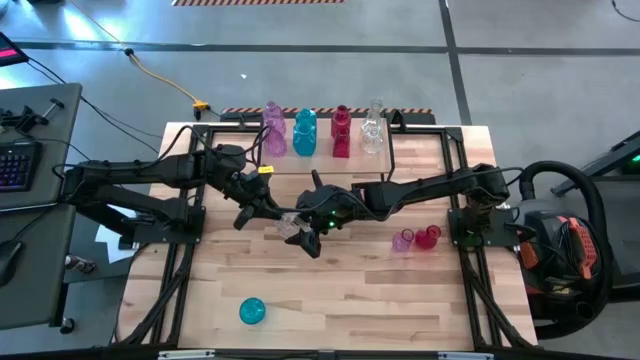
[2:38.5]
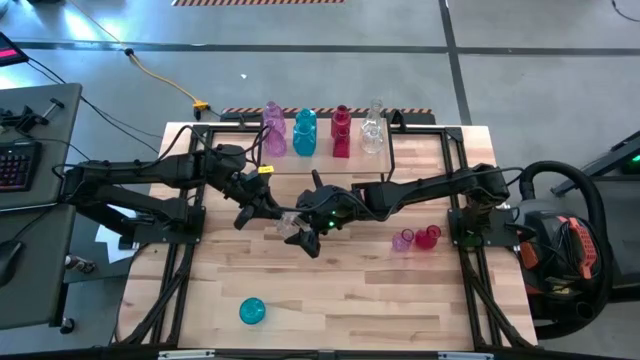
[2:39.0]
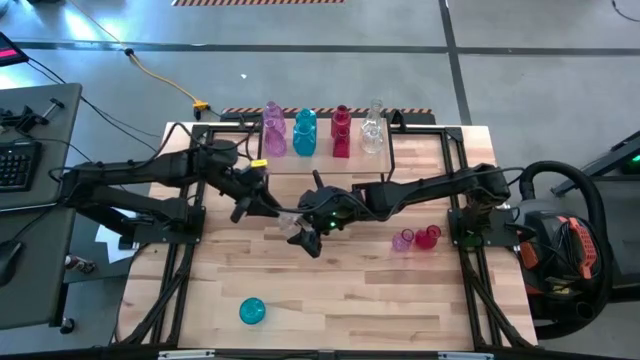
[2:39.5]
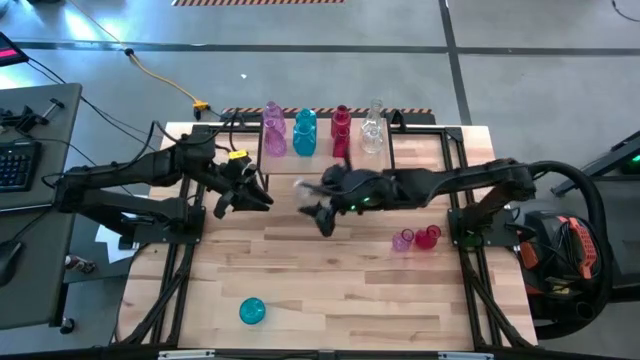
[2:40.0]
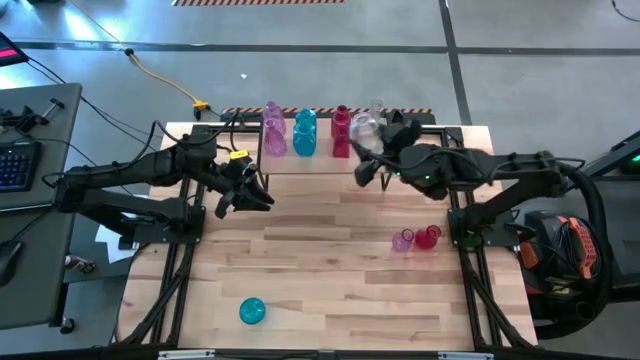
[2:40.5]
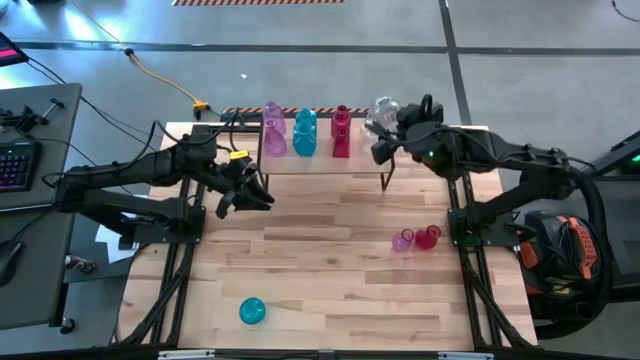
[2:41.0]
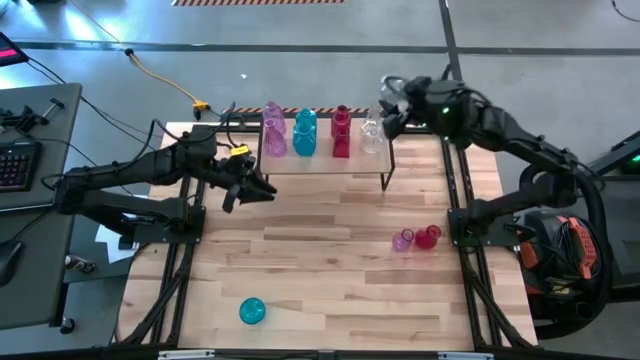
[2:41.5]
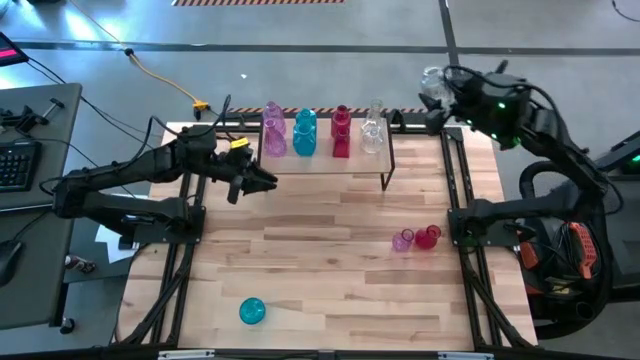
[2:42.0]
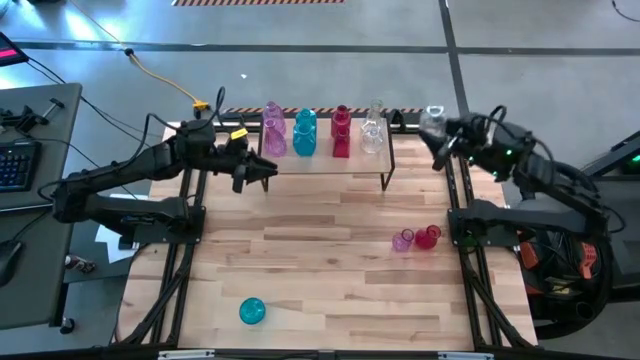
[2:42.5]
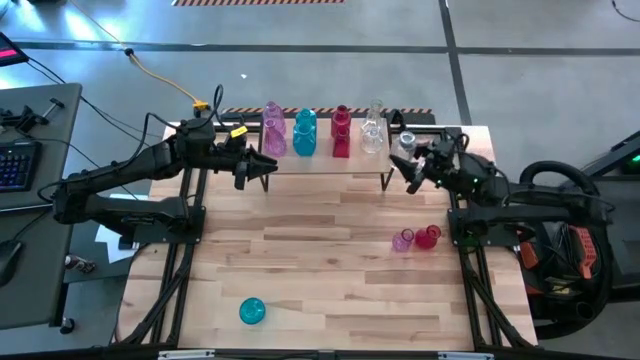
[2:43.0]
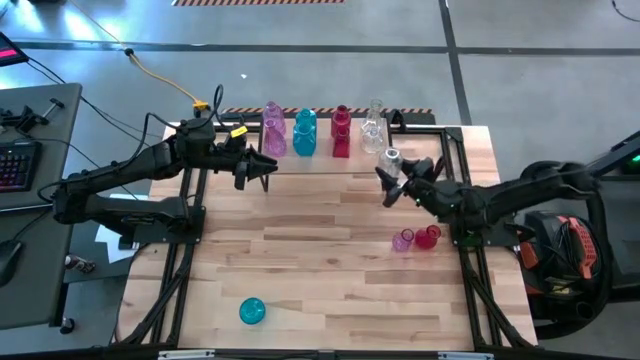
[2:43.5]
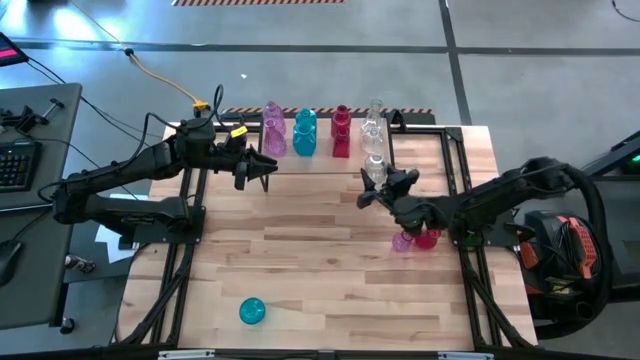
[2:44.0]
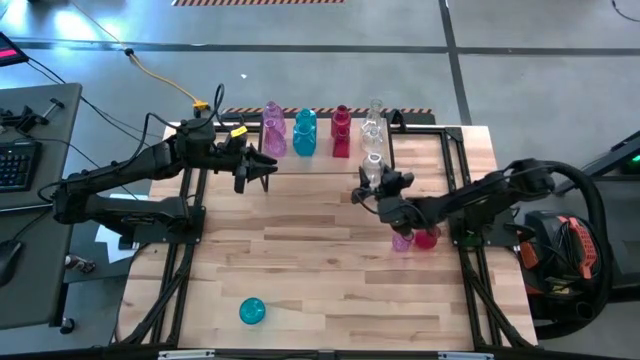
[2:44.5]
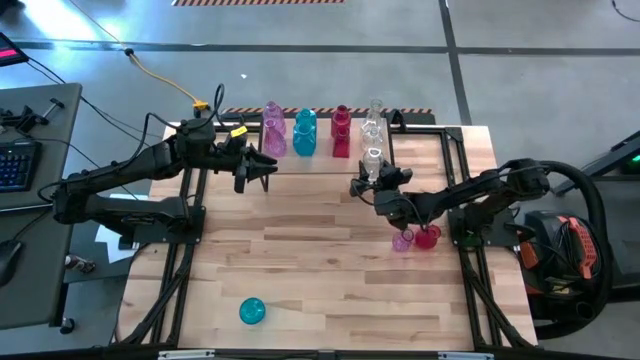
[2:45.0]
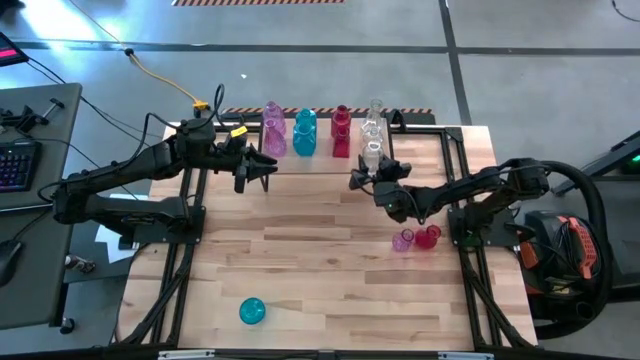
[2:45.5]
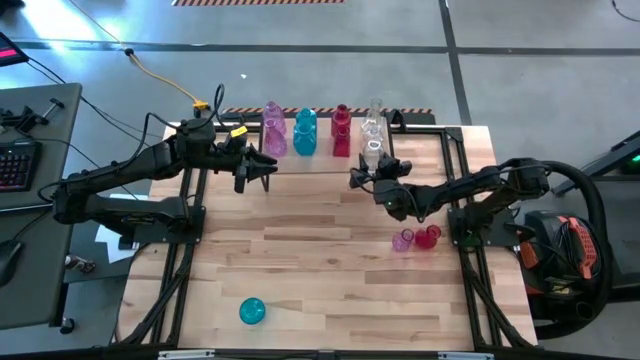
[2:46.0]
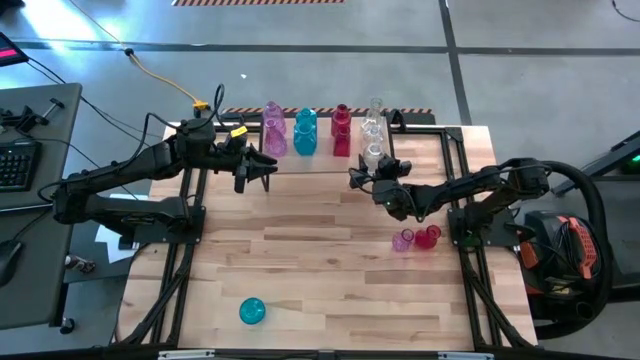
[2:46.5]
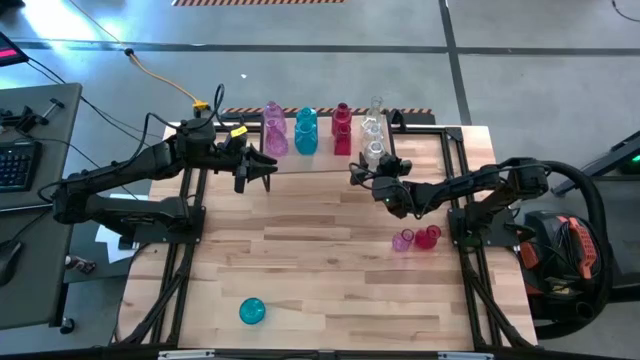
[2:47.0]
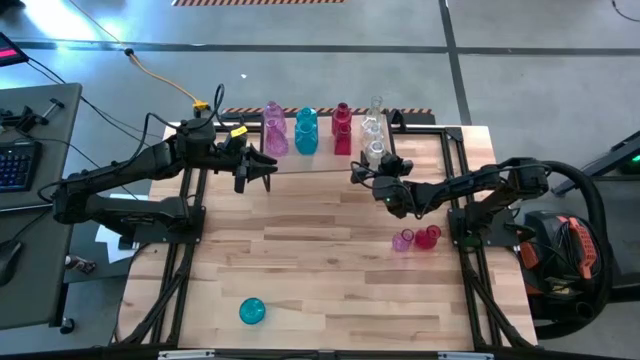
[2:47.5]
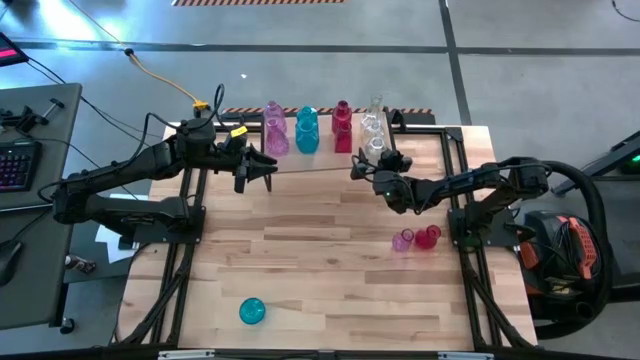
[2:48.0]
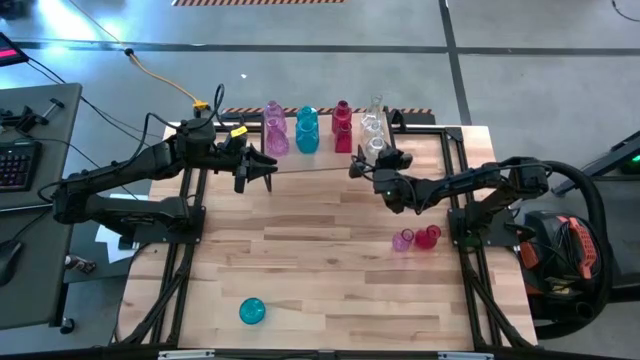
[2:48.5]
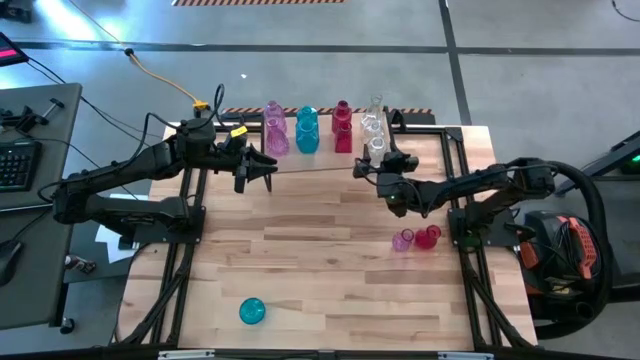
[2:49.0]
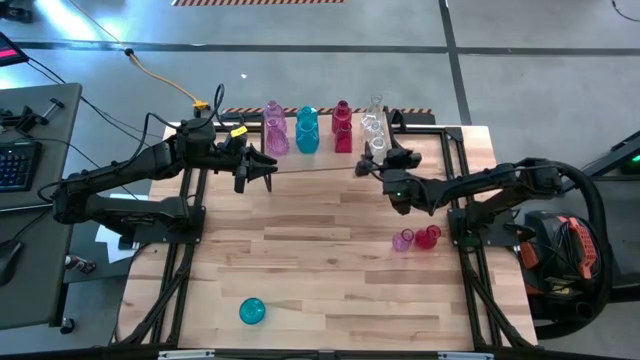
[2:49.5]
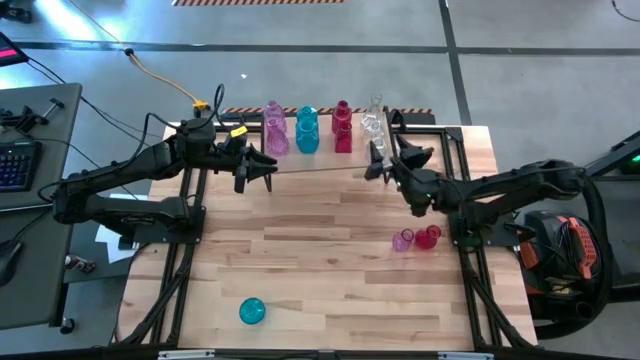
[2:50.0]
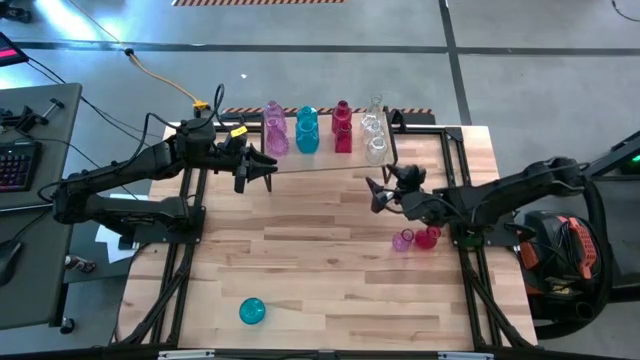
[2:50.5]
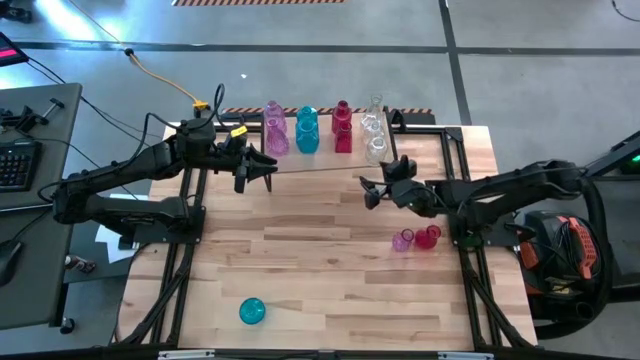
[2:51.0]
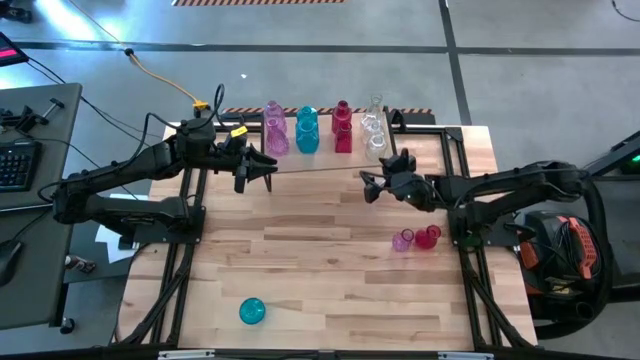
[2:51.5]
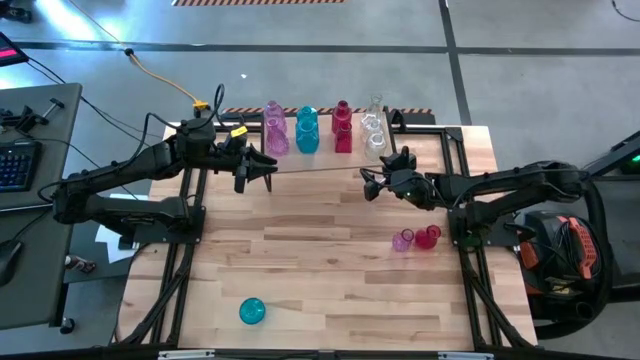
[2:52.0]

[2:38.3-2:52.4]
Task: sort vases onto shelf
Put the transparent vase on the shelf aligned with the other transparent vases

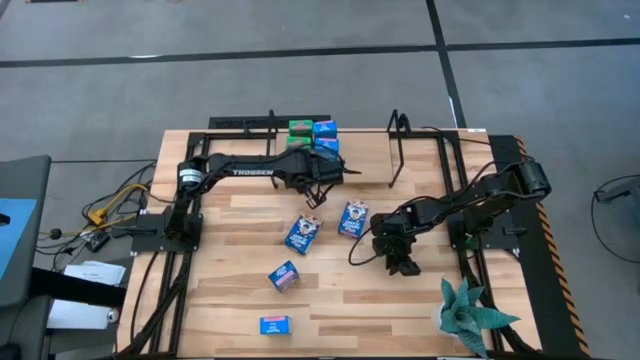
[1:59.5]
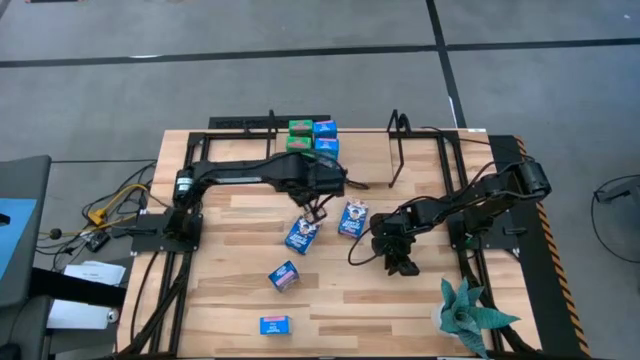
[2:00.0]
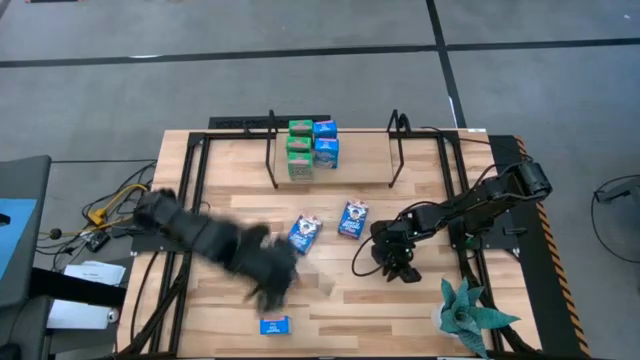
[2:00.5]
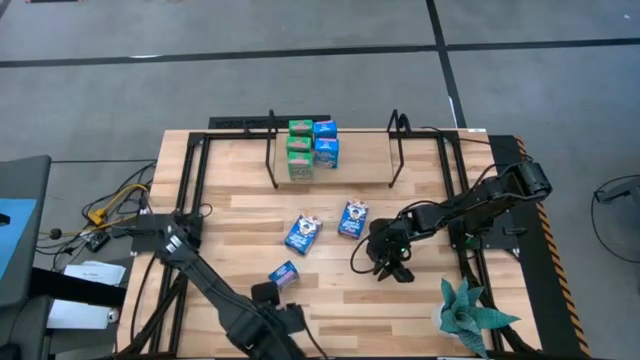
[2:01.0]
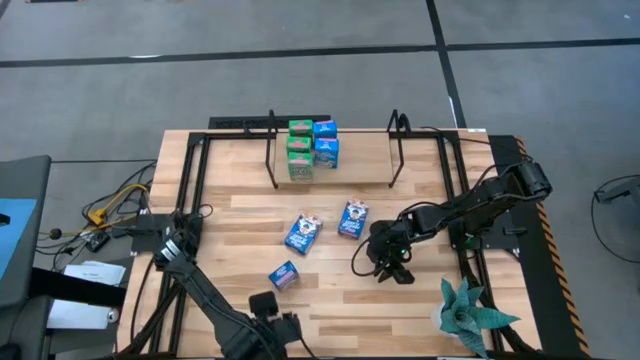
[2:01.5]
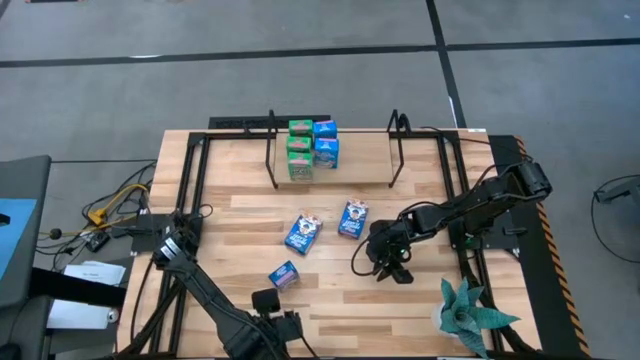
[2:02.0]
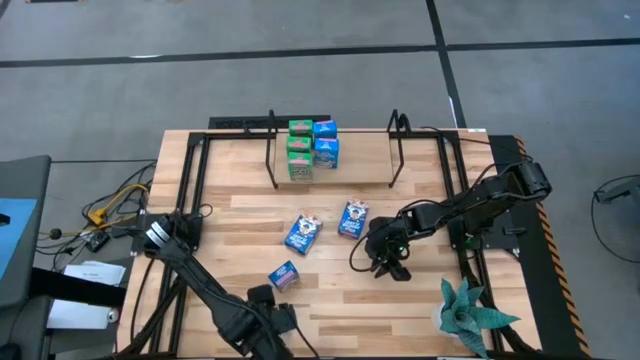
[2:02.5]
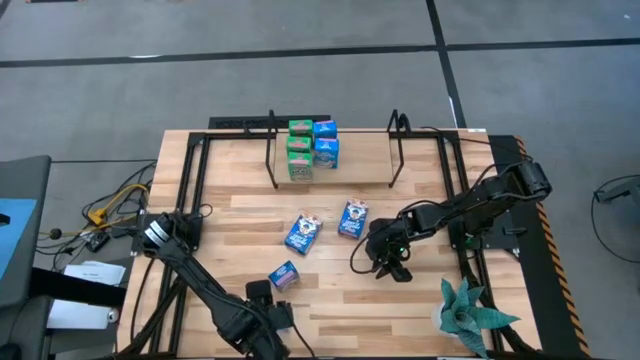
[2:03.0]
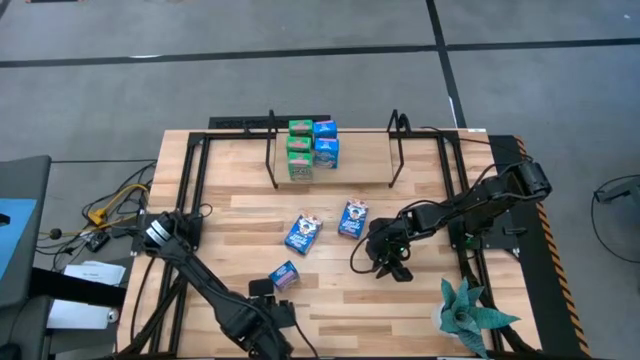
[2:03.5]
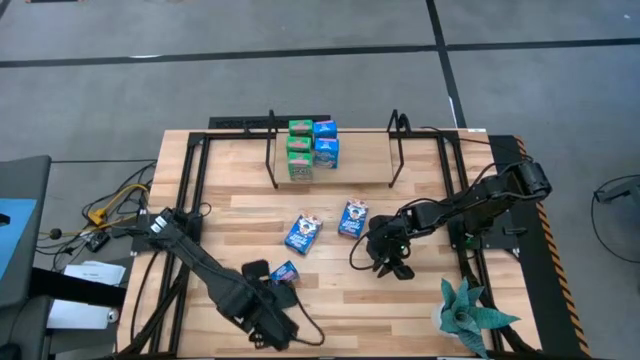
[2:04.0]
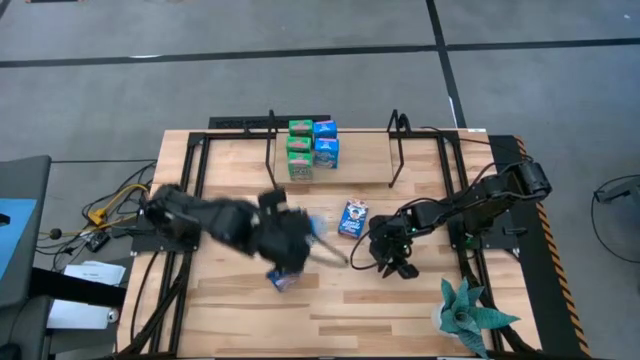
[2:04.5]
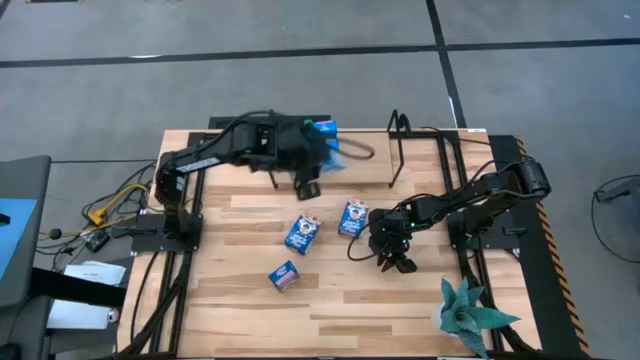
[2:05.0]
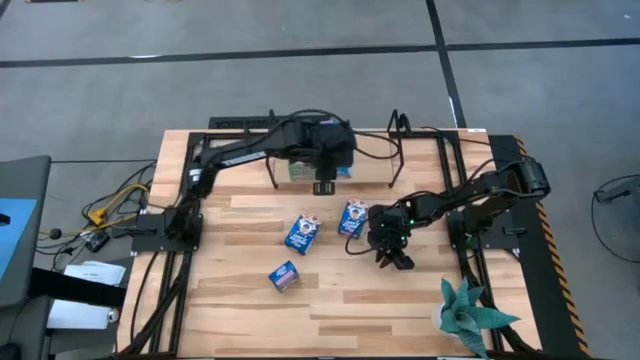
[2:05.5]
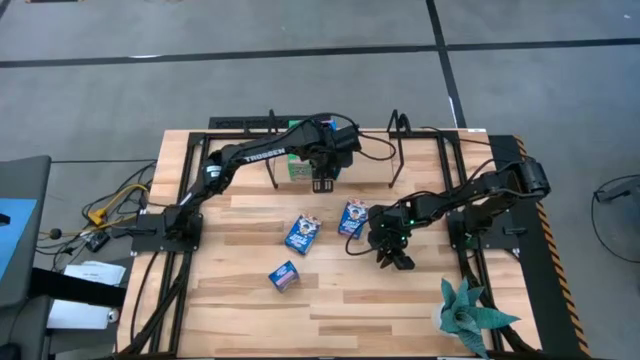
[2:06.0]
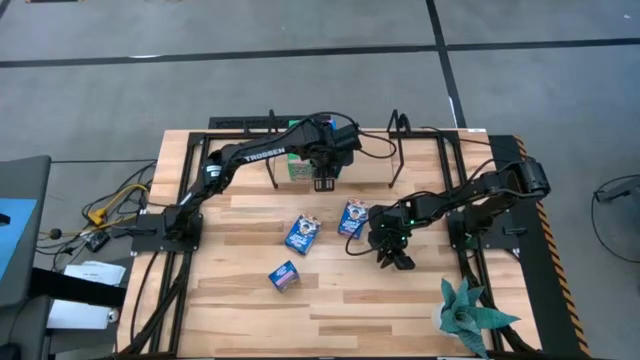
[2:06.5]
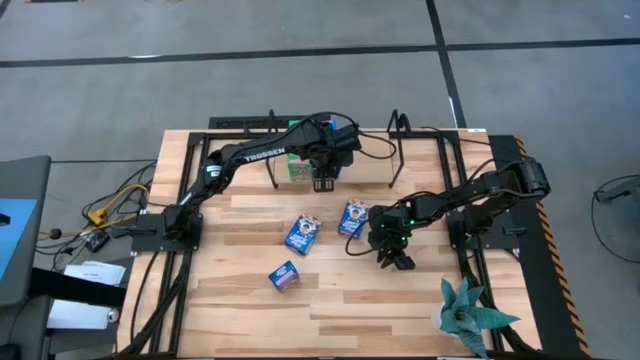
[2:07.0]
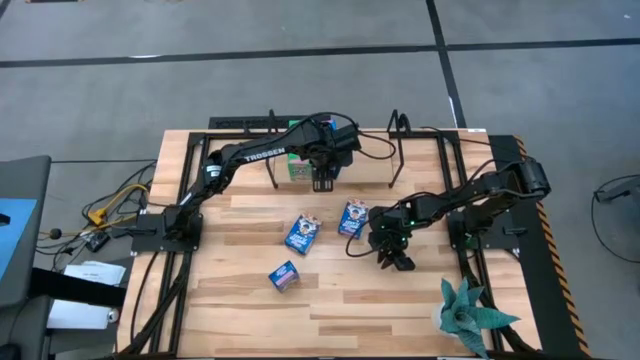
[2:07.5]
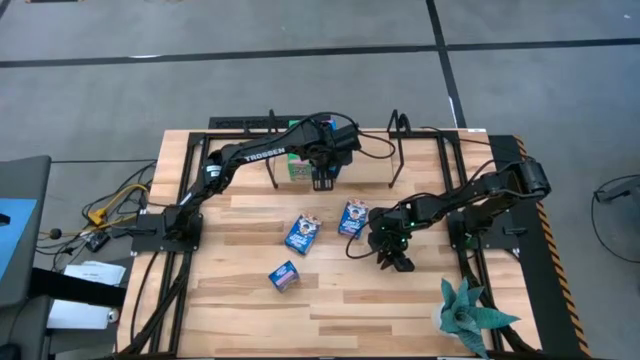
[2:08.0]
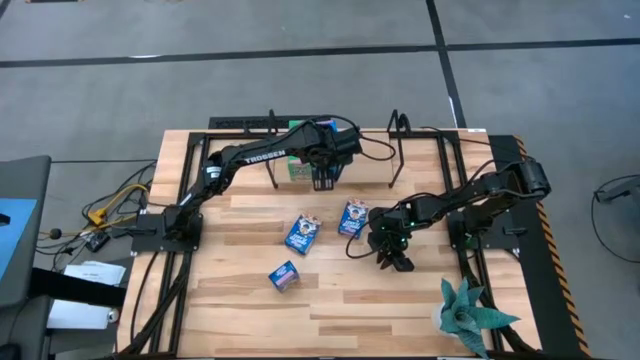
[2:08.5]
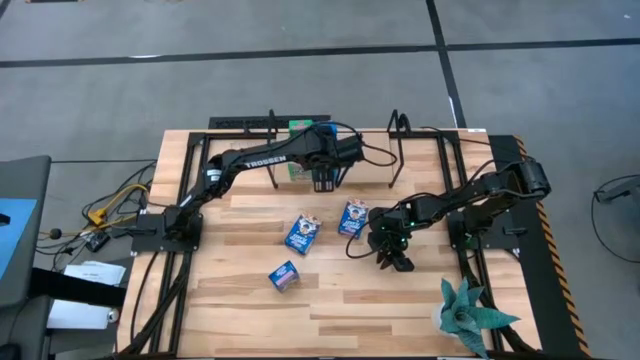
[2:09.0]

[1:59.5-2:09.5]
Task: Stack cereal on shelf
Put the light blue cereal box on the shelf aligned with the other light blue cereal box
